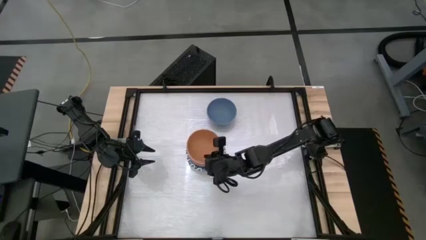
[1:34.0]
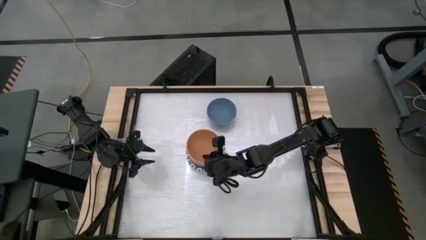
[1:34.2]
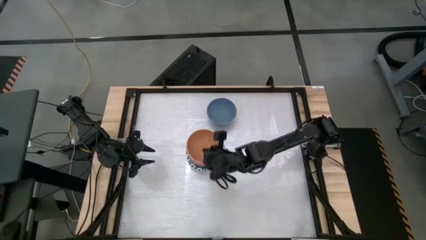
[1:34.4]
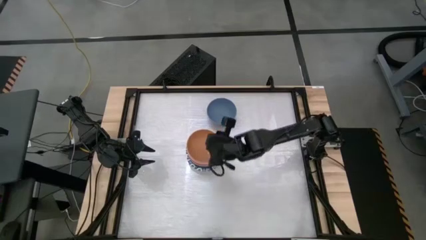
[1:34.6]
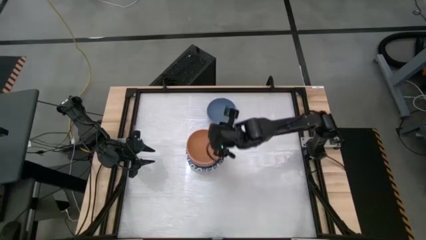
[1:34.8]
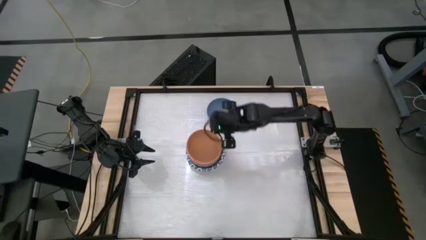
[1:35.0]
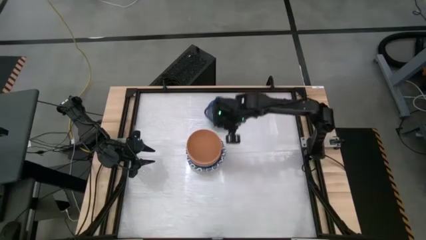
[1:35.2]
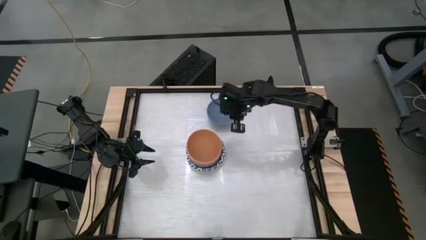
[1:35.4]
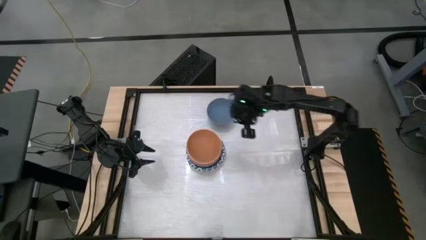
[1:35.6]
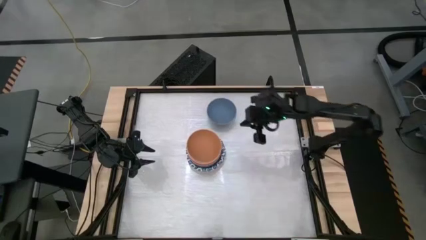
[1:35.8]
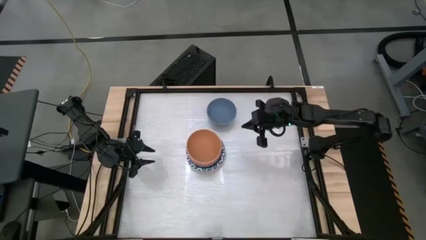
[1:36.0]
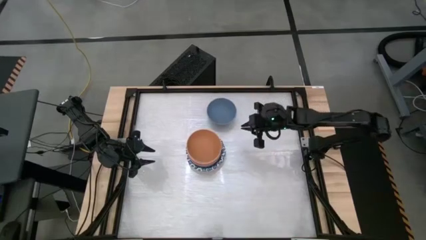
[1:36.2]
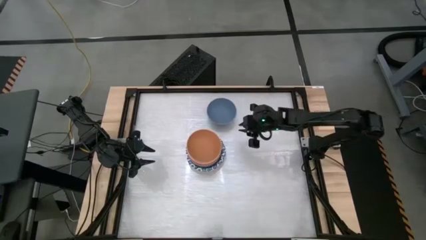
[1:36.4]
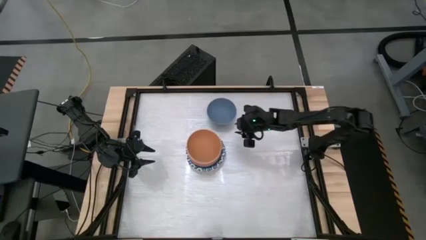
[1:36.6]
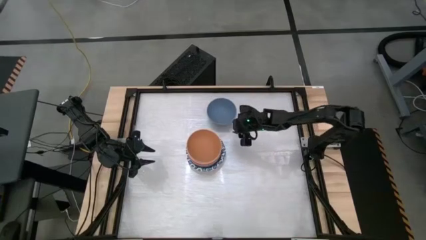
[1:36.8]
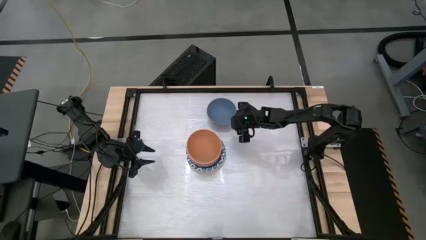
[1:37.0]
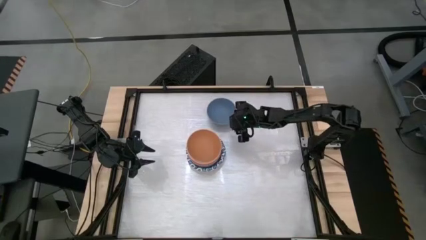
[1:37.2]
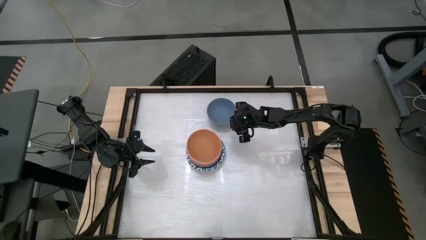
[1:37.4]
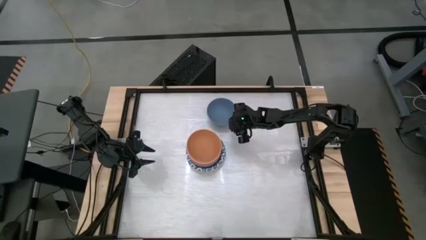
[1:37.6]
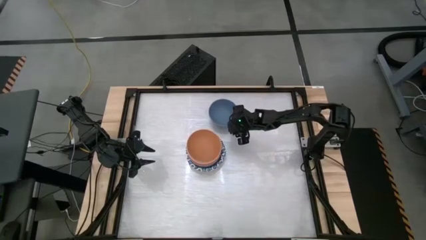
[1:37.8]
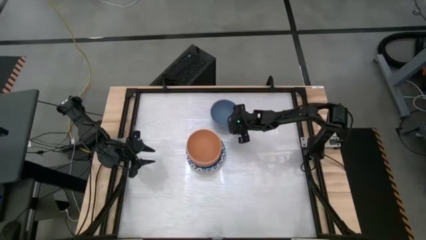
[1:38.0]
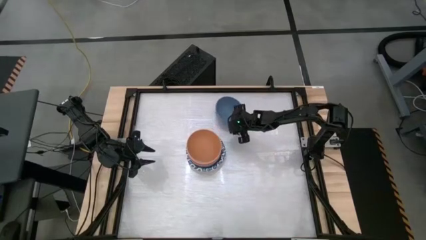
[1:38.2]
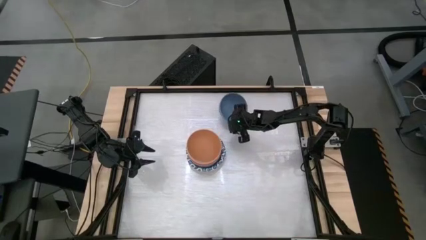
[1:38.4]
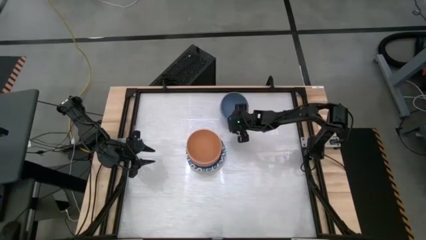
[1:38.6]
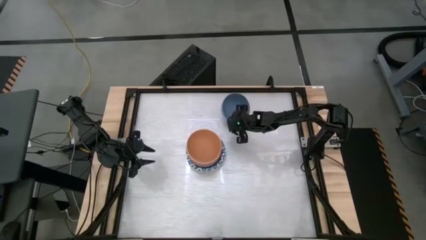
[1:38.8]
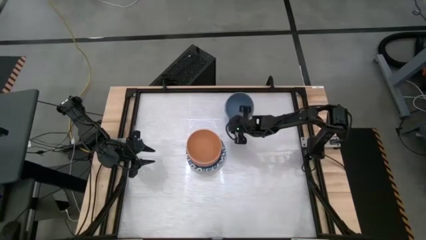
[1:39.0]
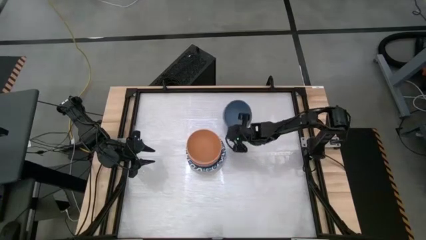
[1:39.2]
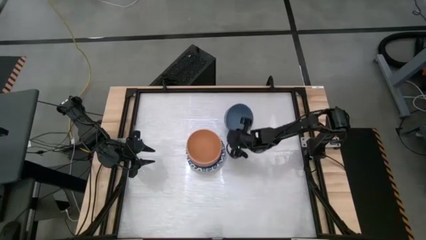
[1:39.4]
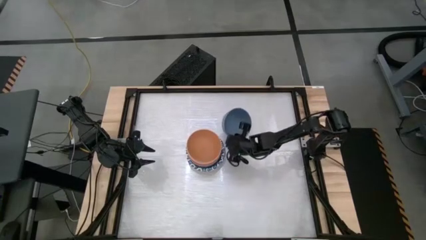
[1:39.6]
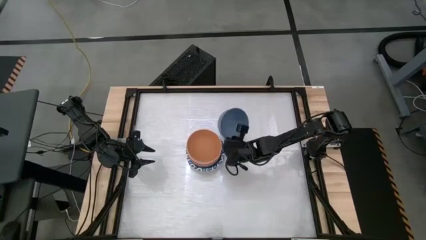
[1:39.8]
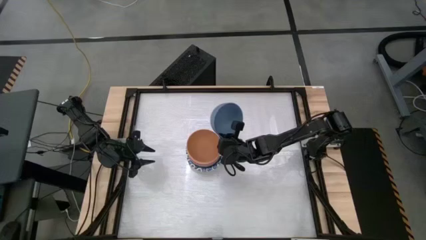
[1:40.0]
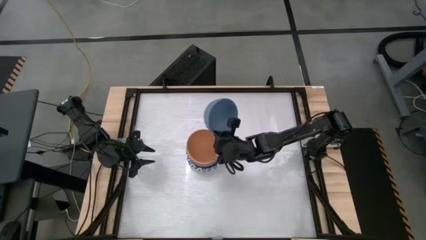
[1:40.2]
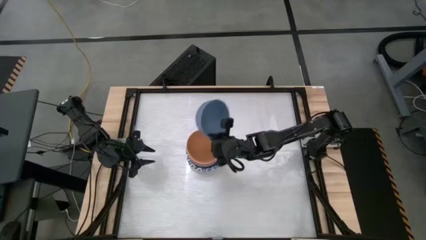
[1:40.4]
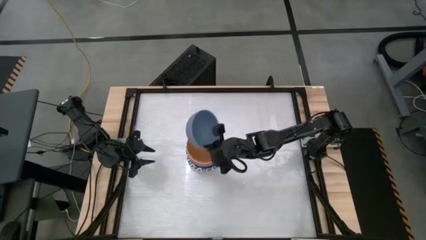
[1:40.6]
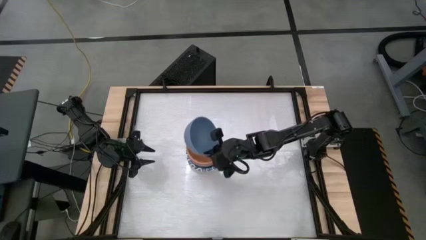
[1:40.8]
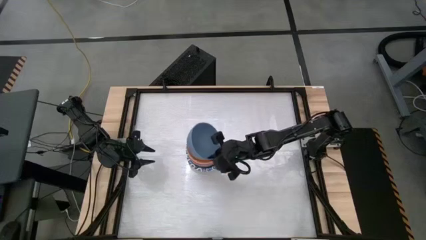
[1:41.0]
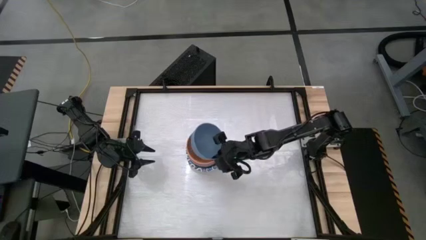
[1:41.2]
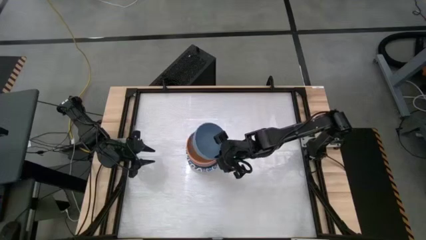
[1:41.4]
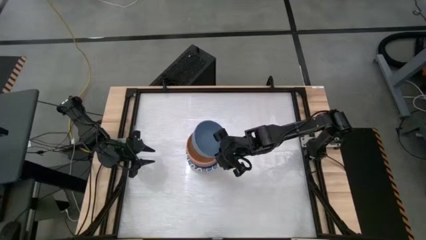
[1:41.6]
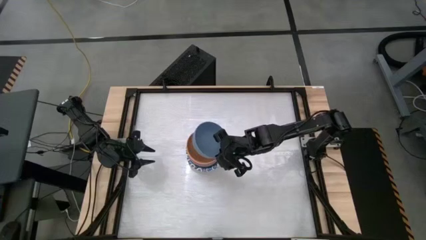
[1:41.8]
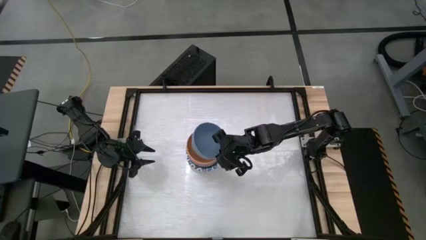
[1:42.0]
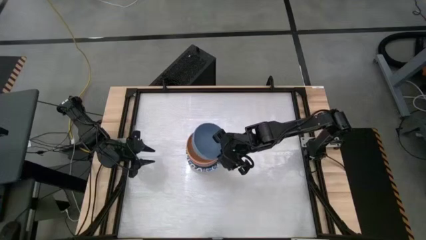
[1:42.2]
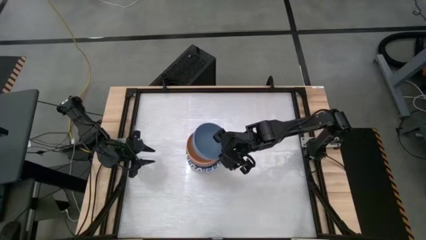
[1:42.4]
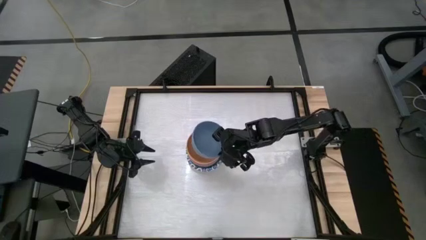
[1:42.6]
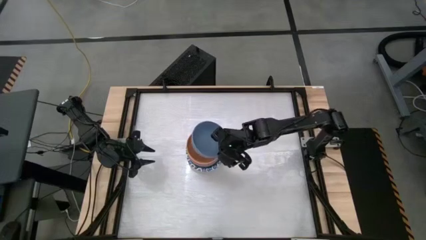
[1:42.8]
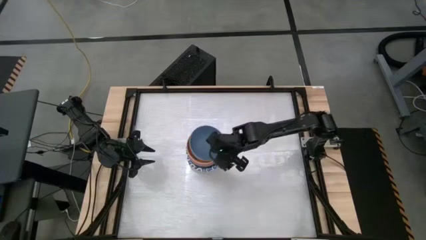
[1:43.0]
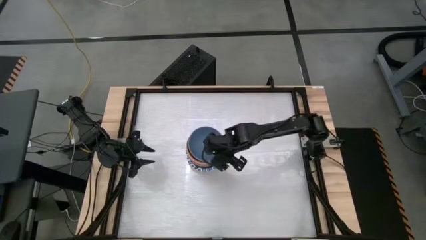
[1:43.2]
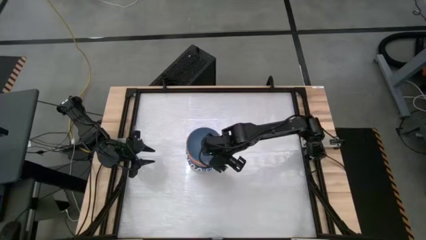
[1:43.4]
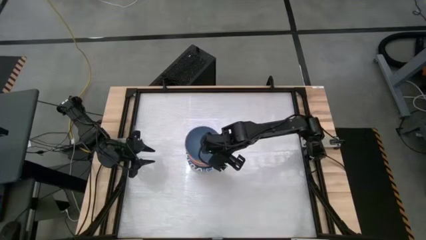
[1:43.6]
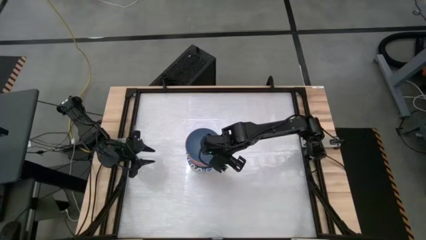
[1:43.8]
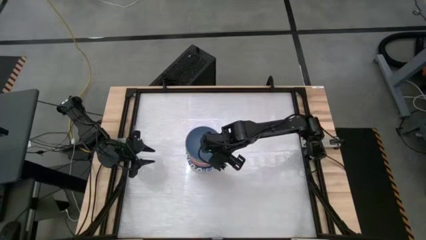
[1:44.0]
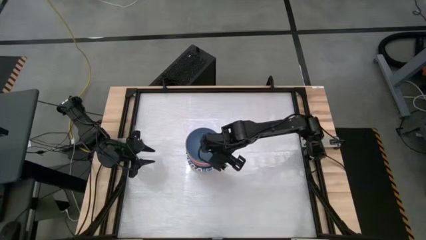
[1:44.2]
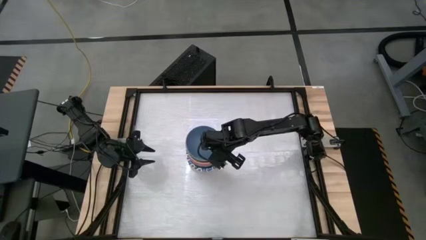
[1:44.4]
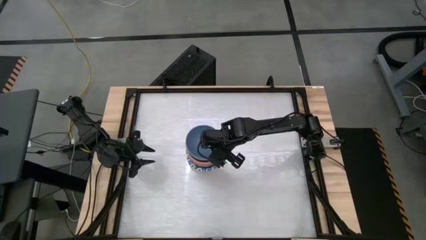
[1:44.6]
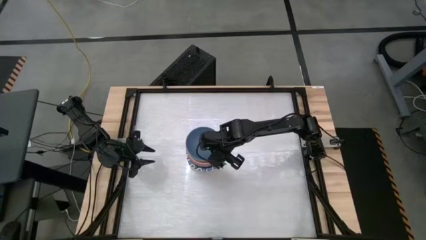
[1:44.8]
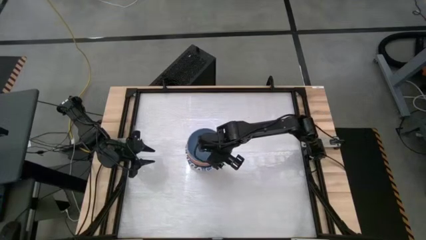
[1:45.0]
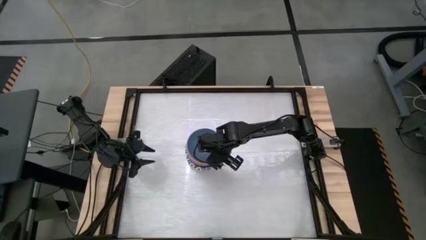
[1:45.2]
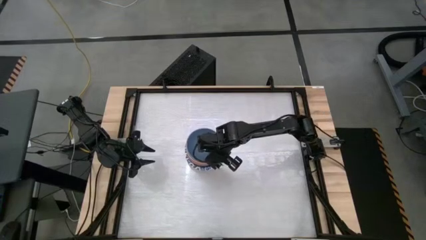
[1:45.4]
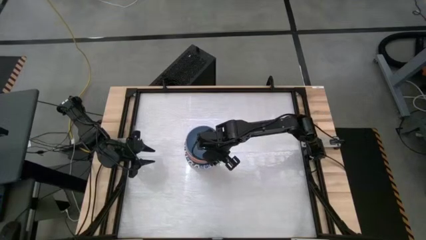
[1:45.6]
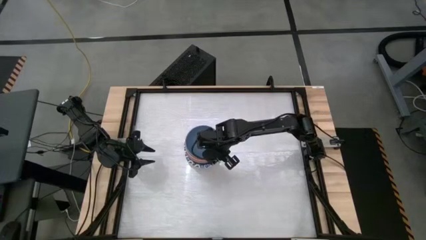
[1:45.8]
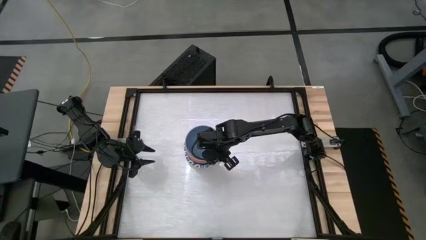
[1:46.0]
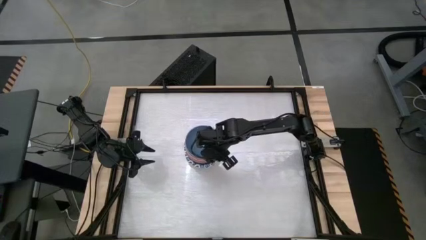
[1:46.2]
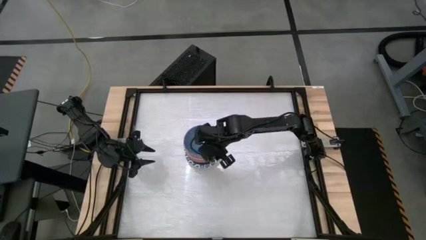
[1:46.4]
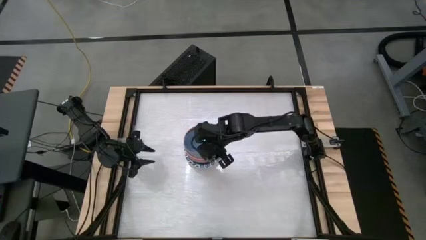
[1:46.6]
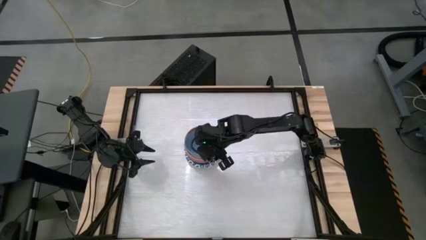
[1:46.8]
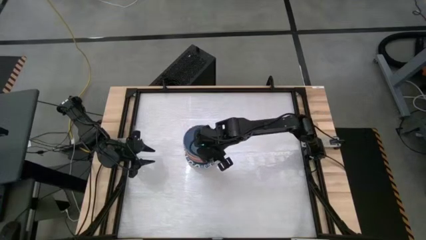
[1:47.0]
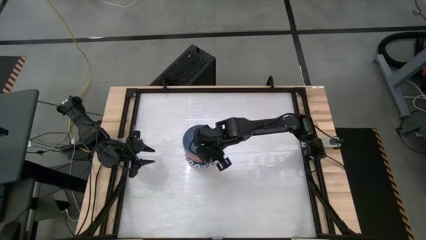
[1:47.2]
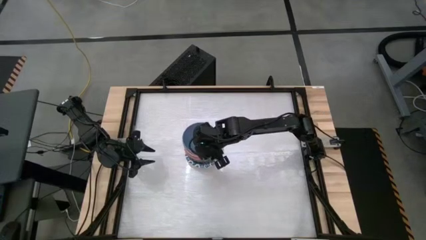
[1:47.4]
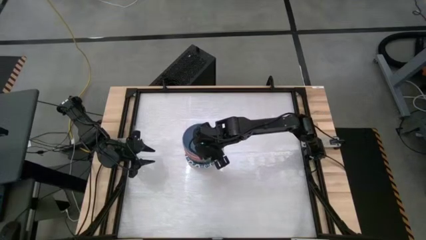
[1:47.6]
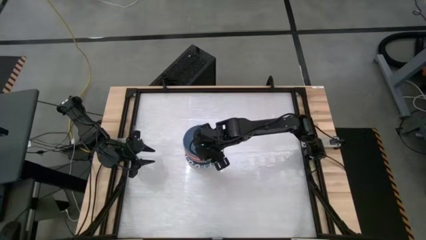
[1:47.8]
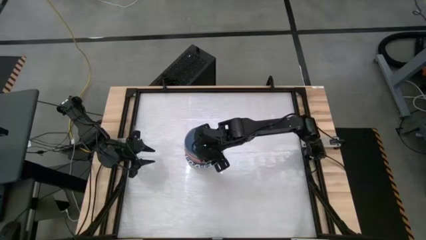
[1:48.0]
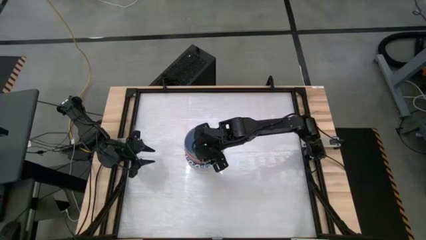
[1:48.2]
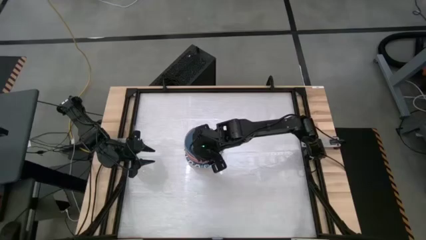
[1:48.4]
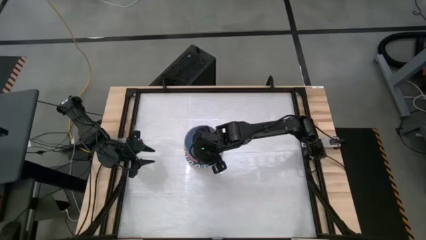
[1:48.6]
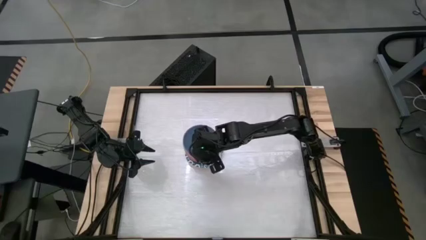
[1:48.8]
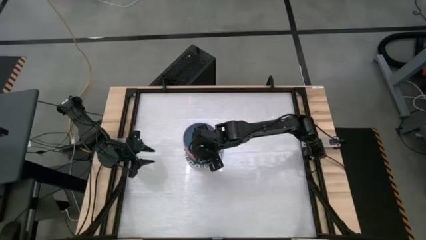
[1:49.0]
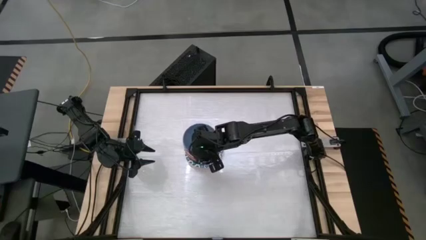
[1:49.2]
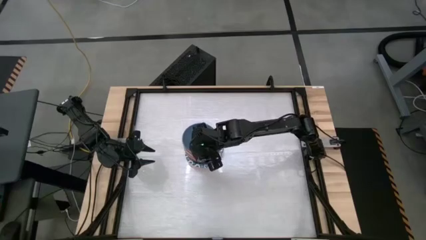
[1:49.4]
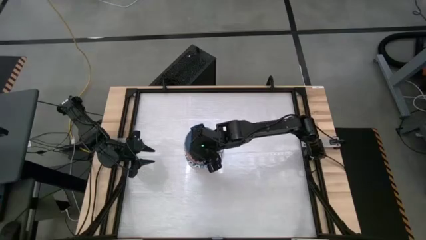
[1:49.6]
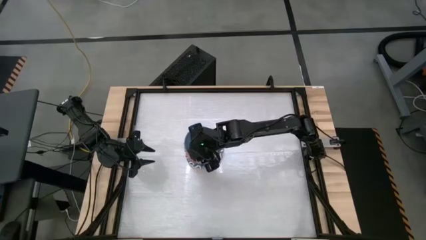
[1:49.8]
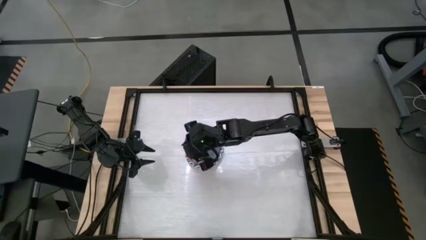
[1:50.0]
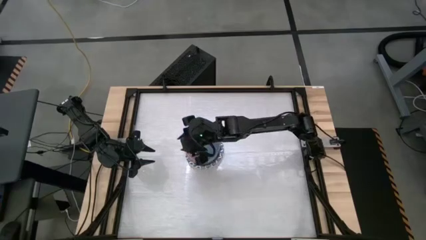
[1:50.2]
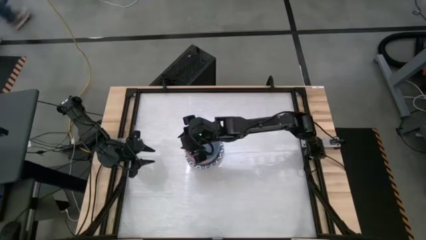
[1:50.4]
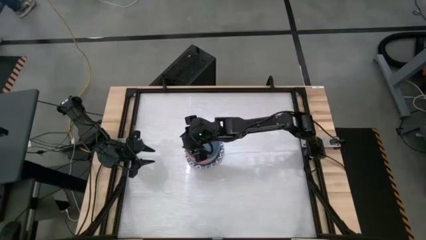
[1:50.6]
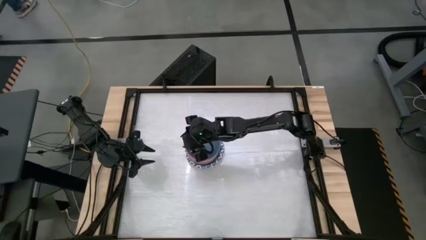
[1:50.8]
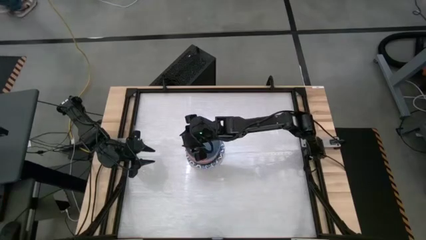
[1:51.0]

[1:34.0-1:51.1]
Stack the blue bowl on top of the light orange bowl
